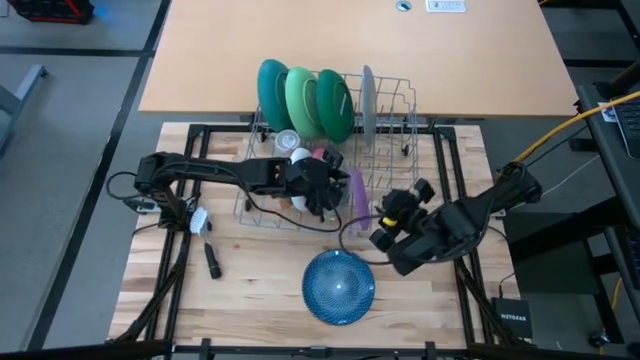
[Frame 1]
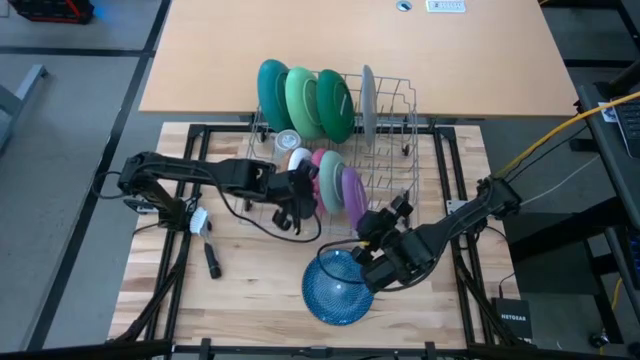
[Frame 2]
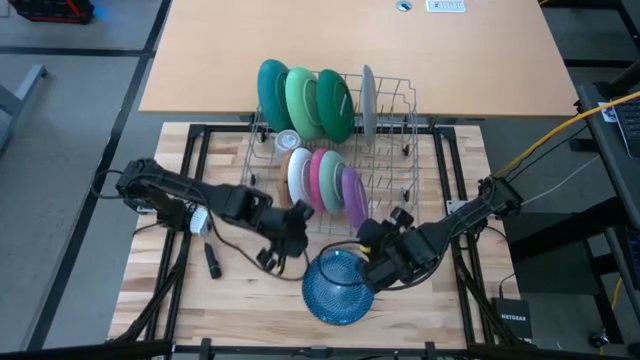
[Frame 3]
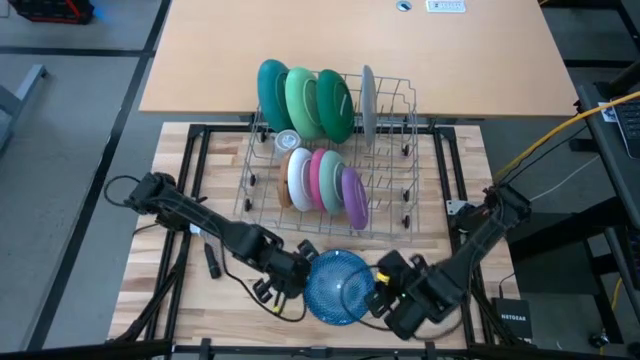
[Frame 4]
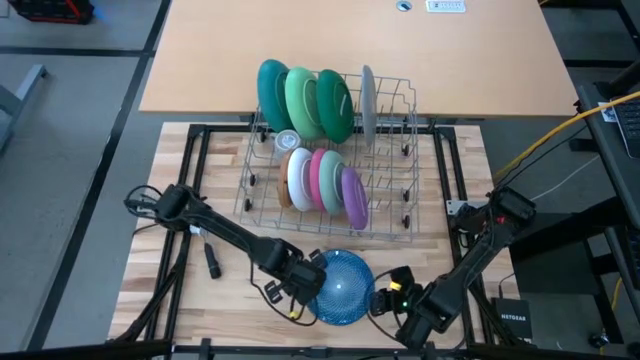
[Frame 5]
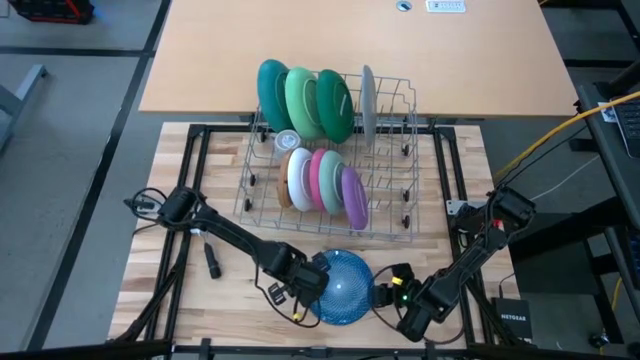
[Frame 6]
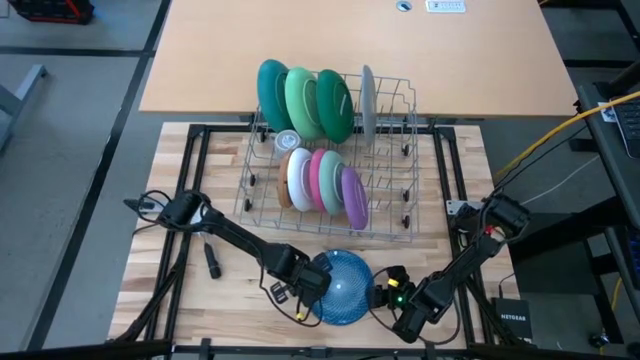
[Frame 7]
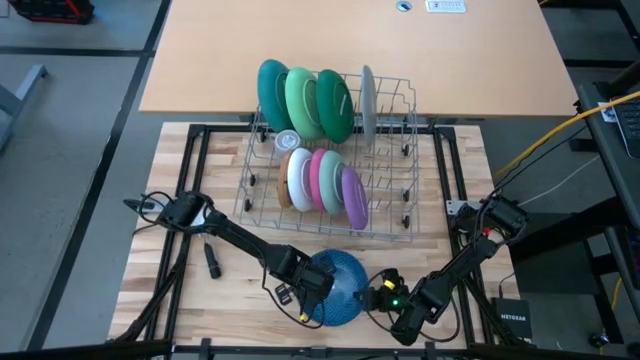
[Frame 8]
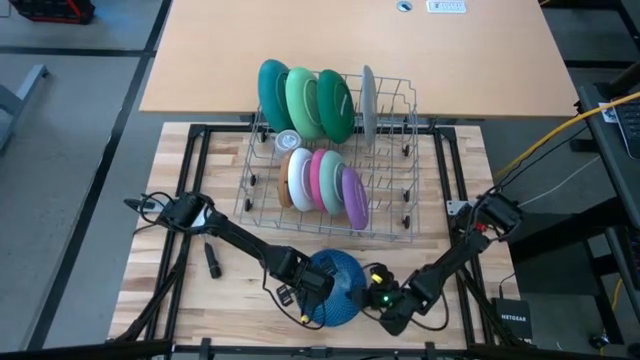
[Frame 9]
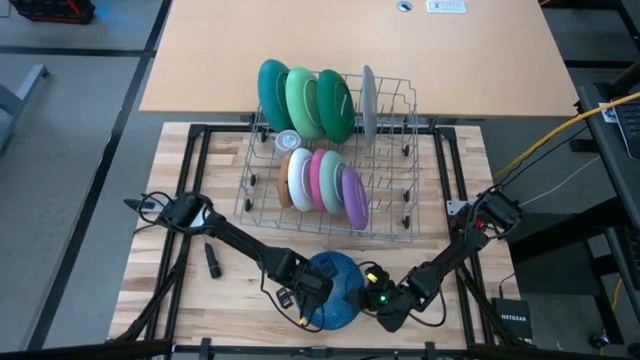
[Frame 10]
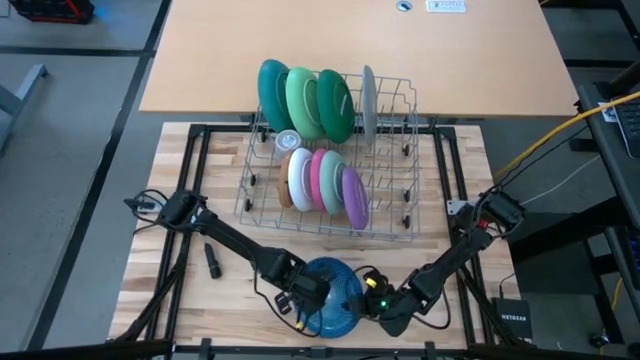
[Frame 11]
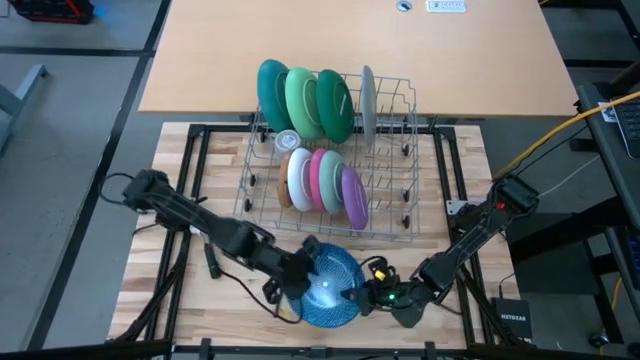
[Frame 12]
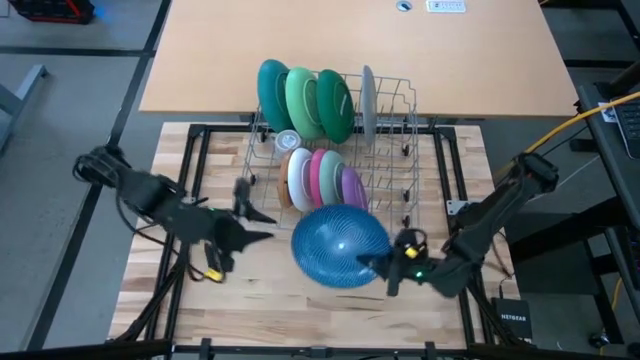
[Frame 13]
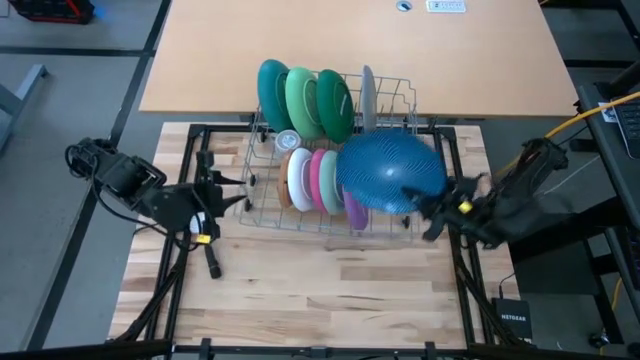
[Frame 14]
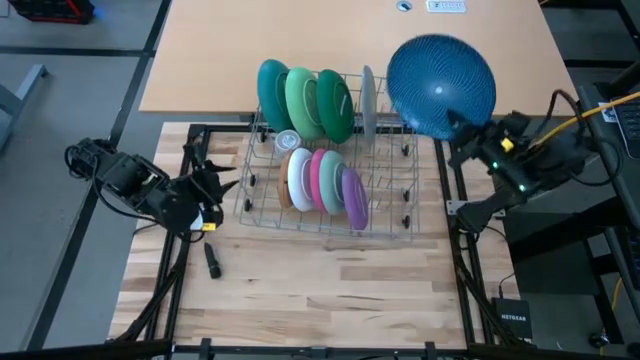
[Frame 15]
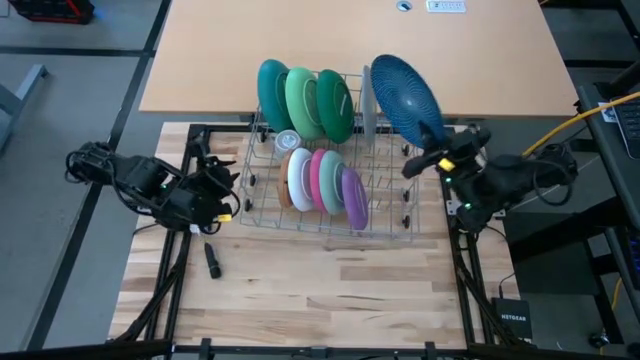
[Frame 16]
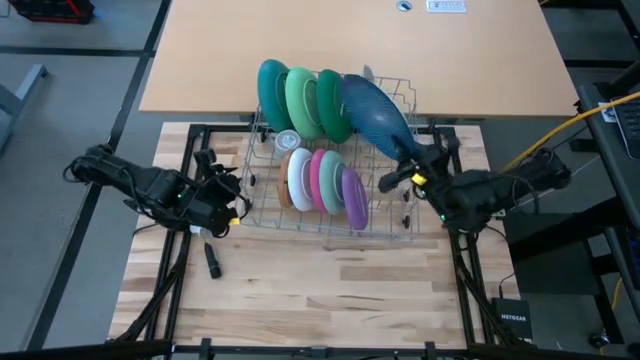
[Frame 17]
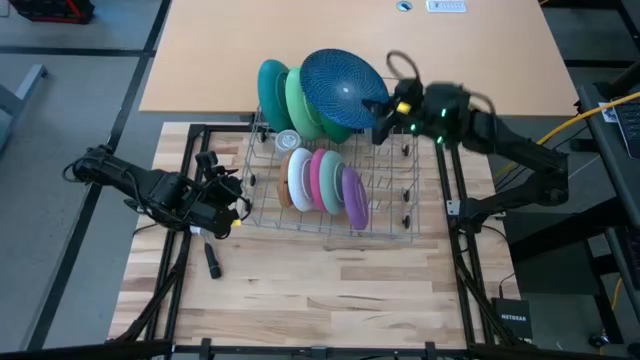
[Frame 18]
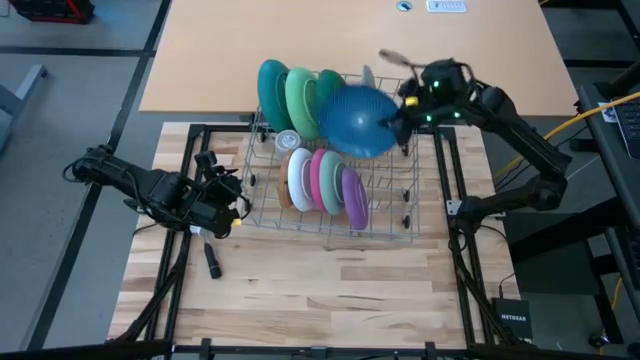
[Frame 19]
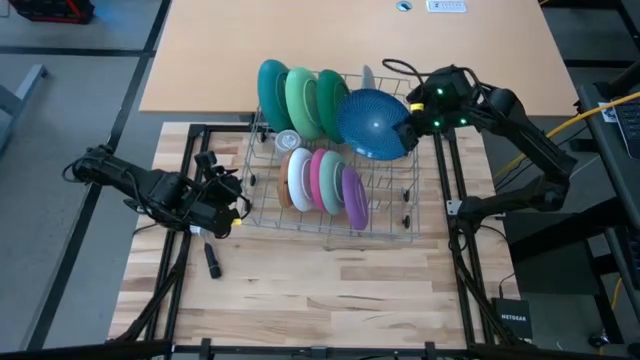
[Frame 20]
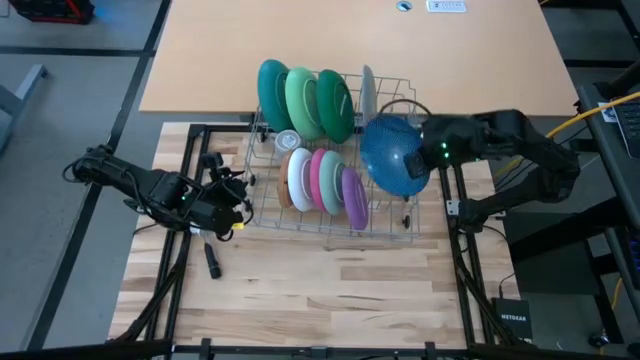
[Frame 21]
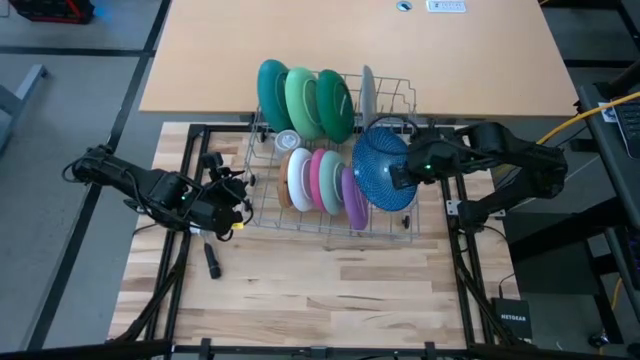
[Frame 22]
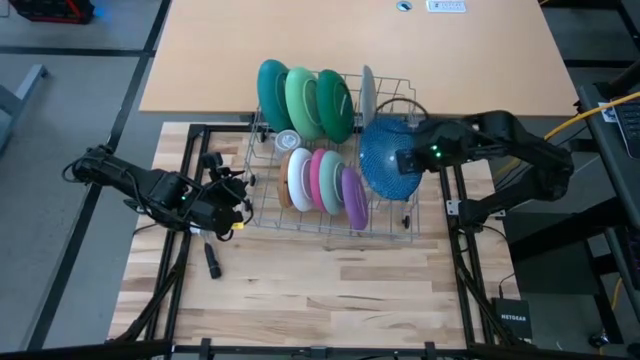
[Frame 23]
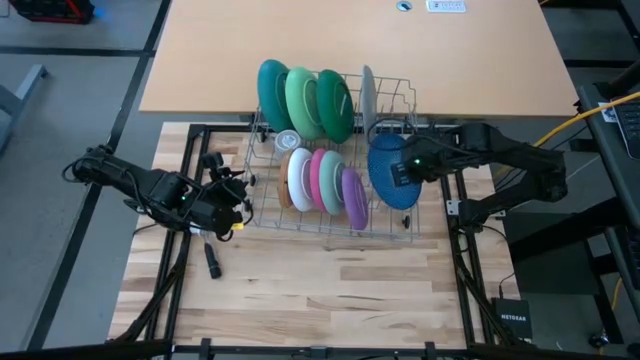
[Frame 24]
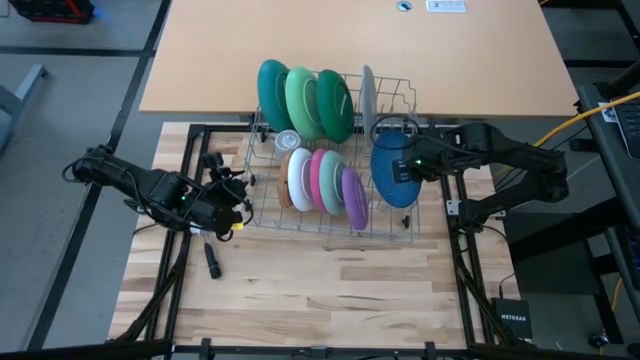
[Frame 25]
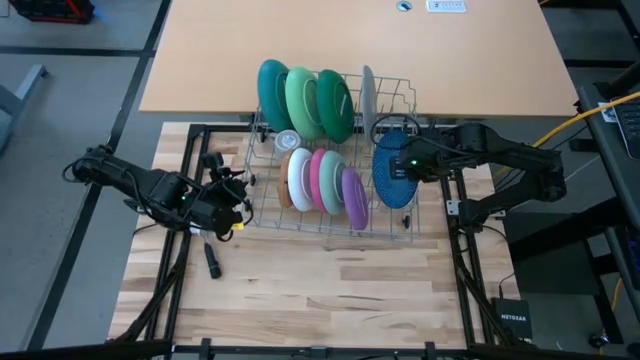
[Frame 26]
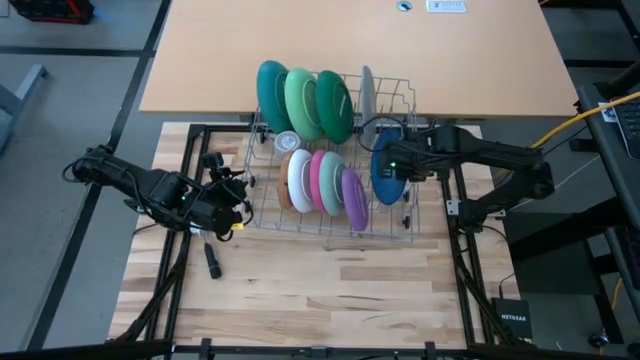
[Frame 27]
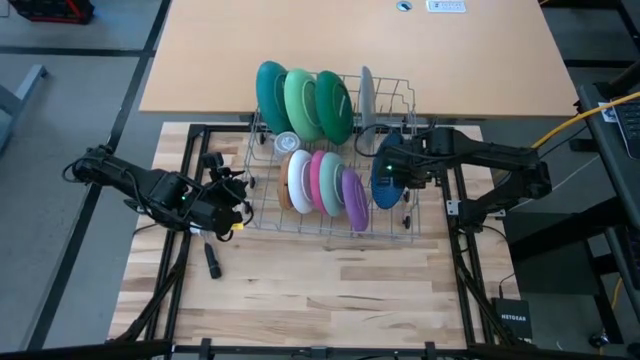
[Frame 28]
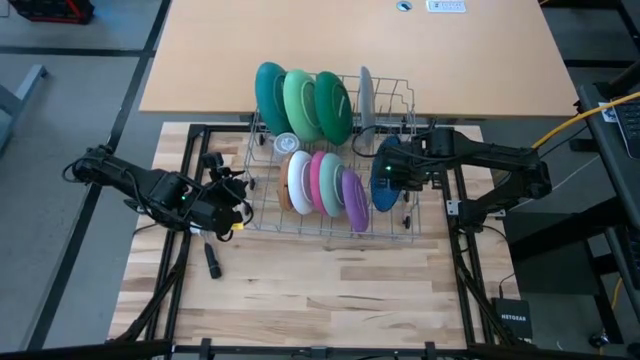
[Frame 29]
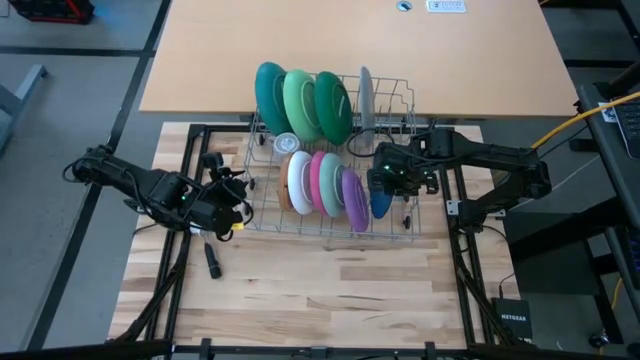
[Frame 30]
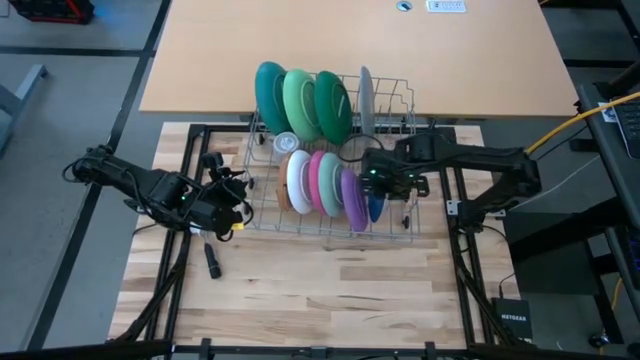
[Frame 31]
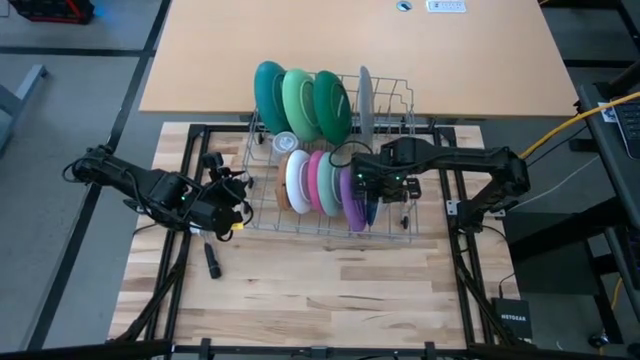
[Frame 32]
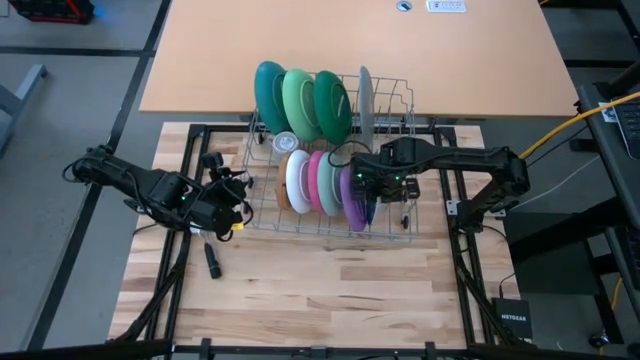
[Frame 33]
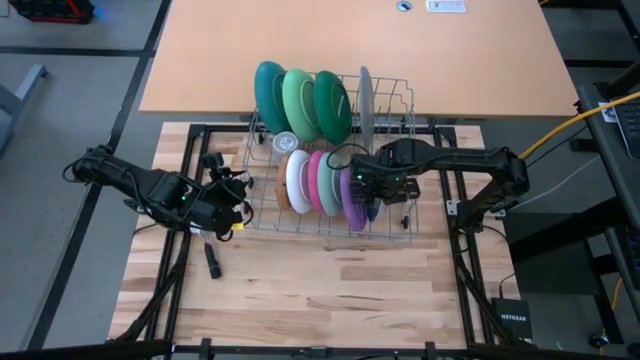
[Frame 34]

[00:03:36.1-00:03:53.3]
Task: Sort dishes
Put the dark blue plate in the dish rack

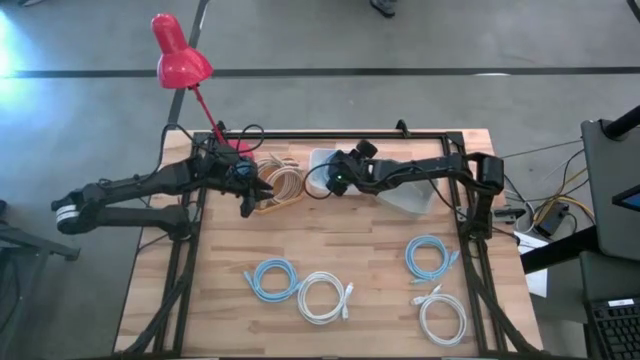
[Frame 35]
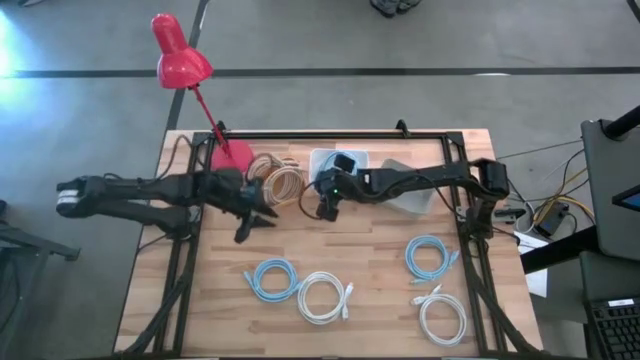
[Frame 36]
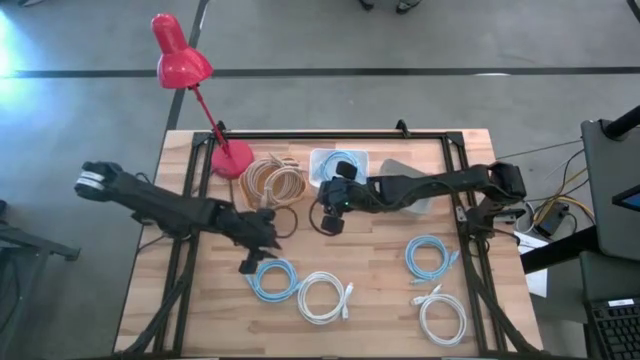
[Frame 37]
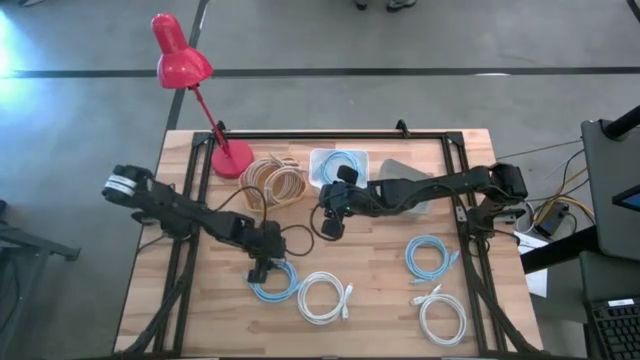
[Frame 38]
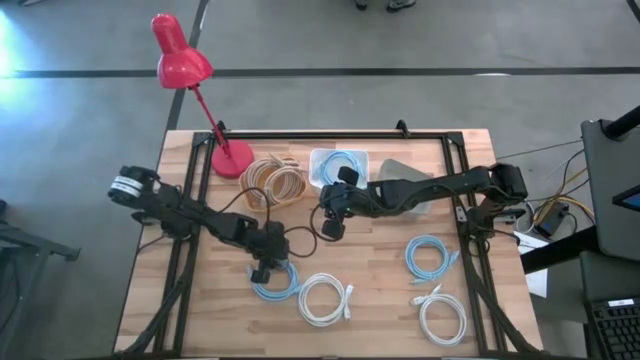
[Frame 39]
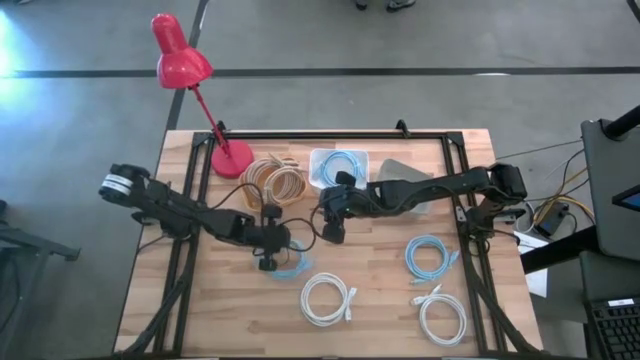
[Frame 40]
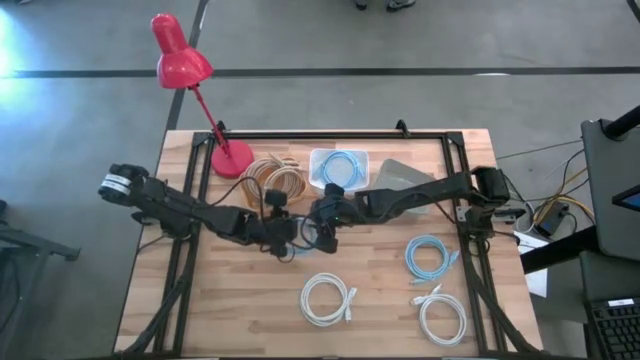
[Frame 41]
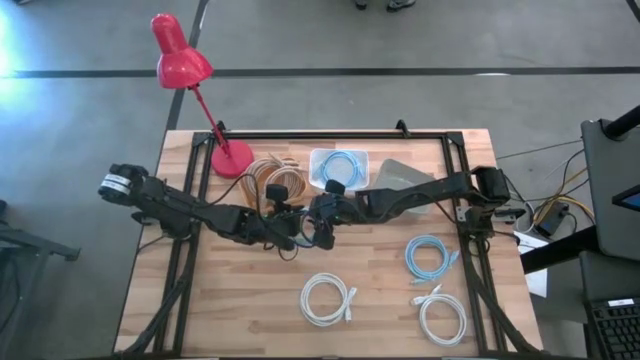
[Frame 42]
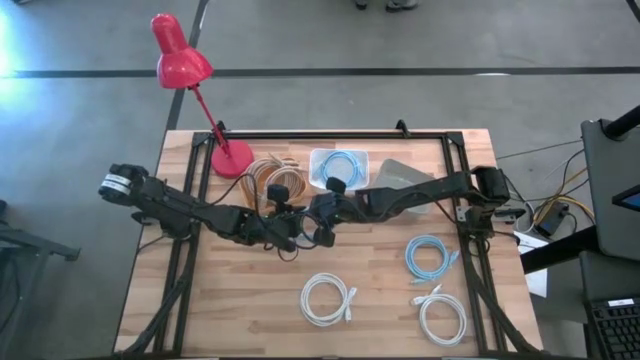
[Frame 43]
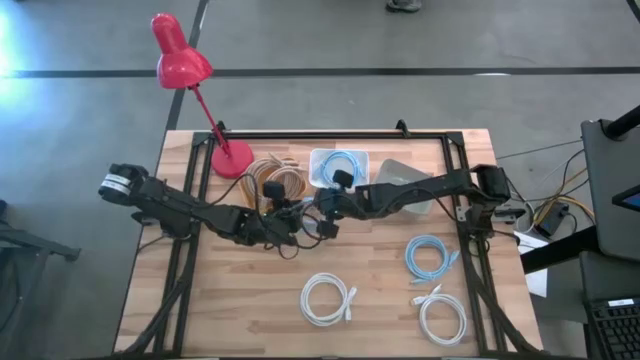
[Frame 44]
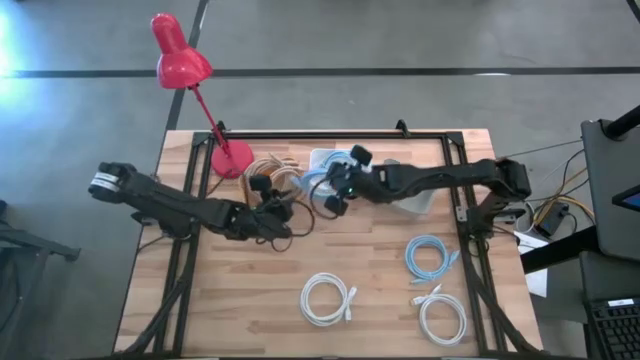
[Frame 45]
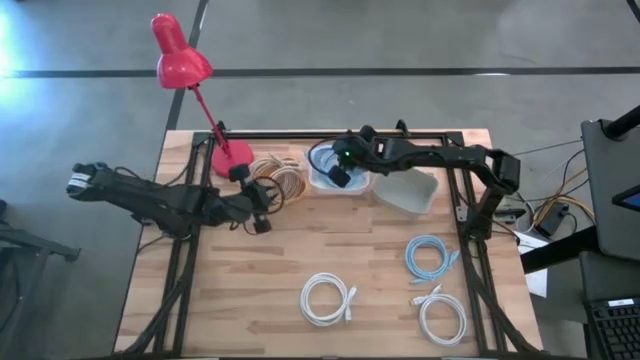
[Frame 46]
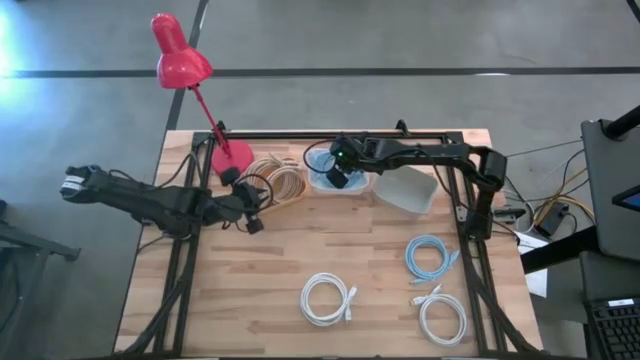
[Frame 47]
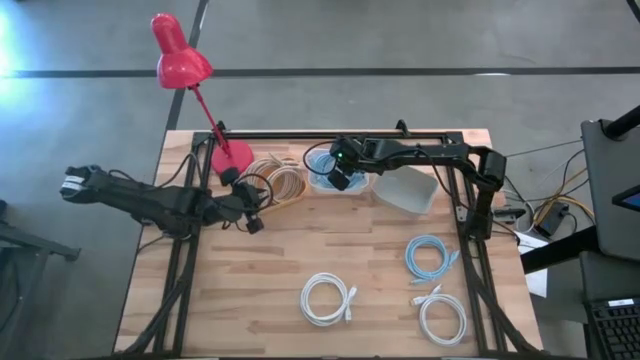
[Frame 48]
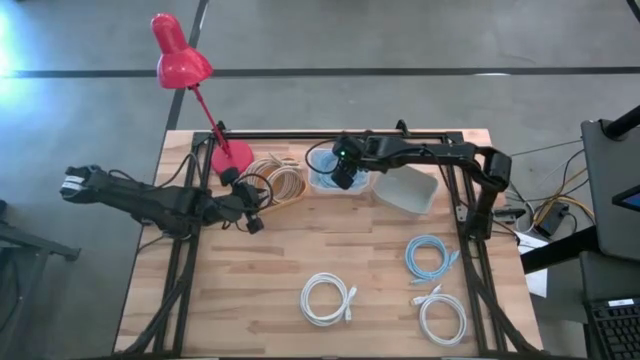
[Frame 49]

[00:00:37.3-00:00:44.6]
Task: Pick & Place USB Port
Put the left blue usb cable into the white bin
